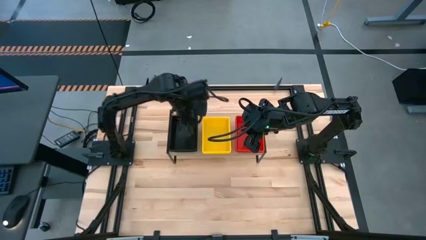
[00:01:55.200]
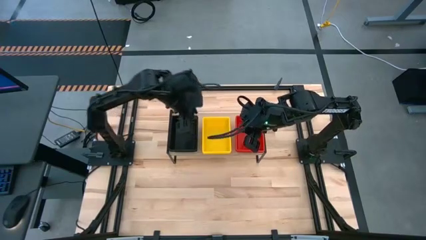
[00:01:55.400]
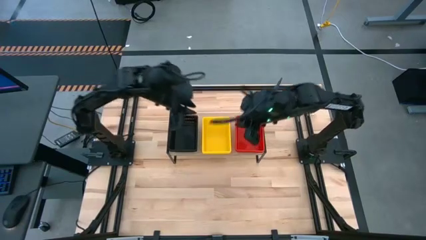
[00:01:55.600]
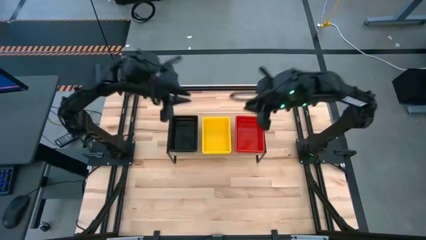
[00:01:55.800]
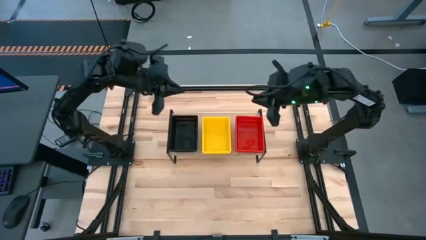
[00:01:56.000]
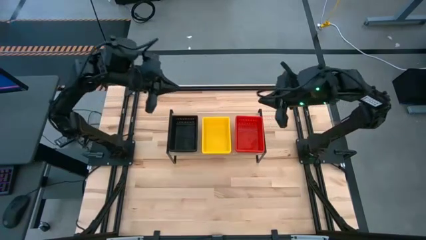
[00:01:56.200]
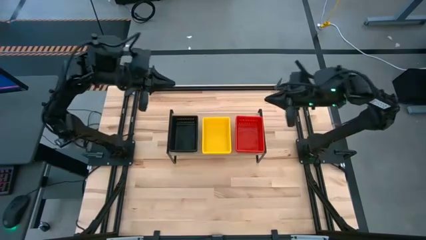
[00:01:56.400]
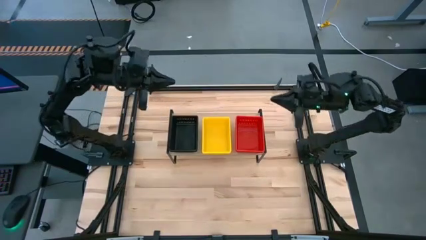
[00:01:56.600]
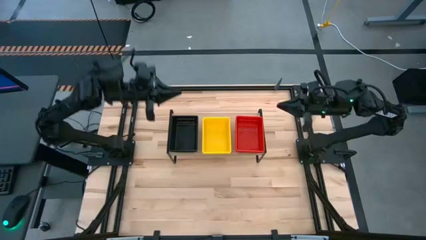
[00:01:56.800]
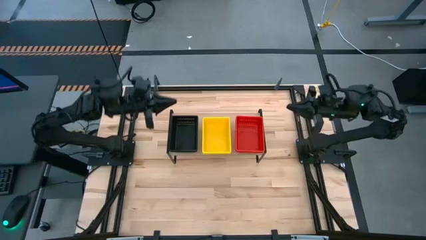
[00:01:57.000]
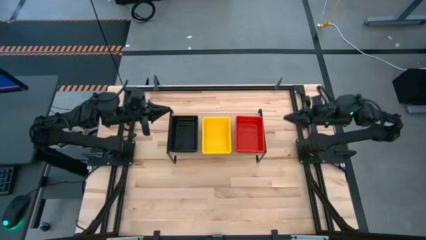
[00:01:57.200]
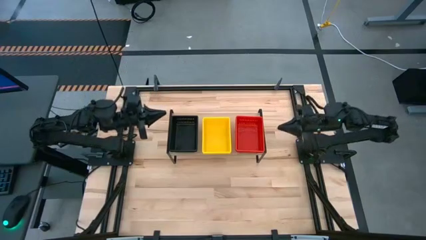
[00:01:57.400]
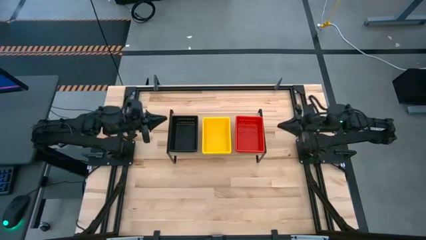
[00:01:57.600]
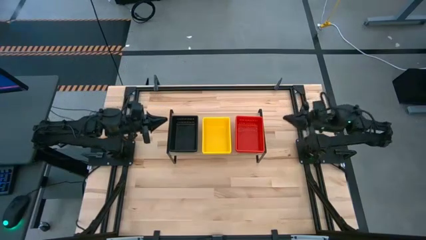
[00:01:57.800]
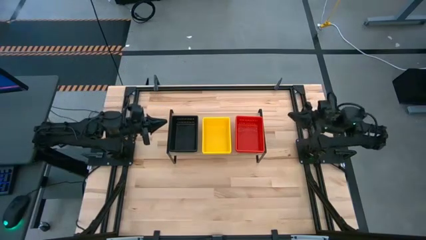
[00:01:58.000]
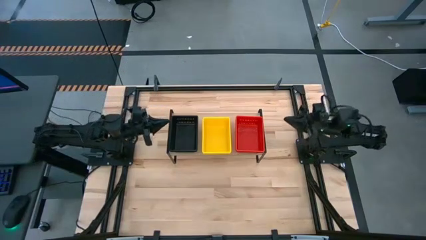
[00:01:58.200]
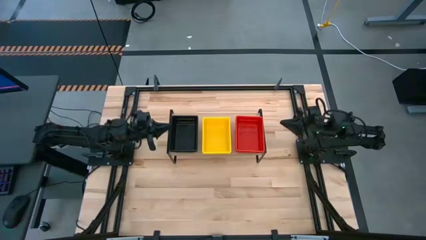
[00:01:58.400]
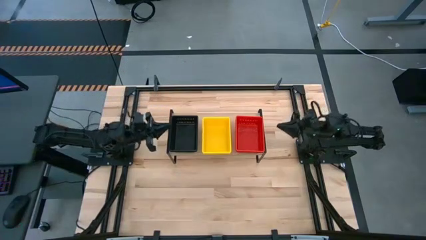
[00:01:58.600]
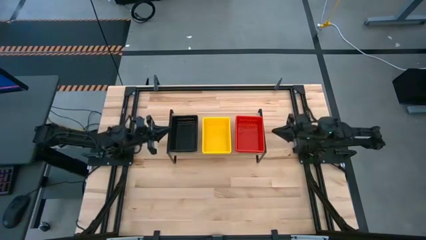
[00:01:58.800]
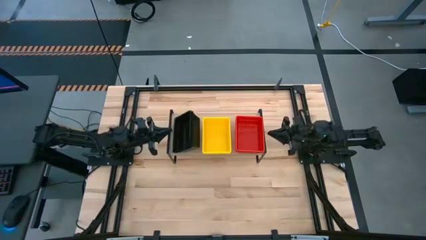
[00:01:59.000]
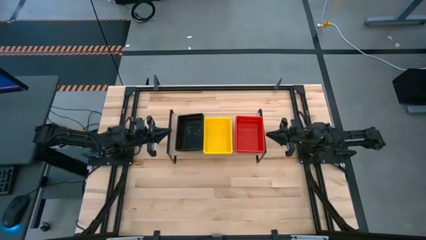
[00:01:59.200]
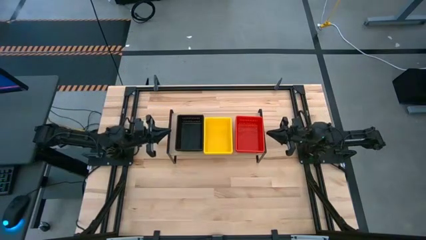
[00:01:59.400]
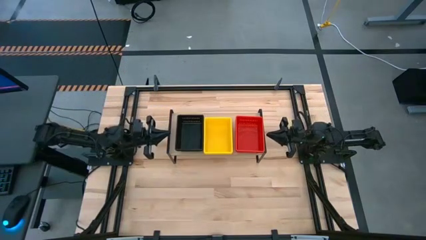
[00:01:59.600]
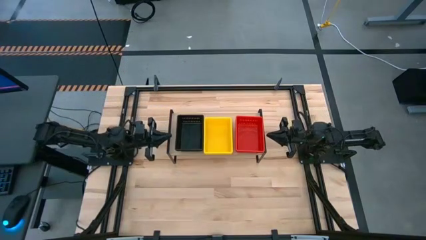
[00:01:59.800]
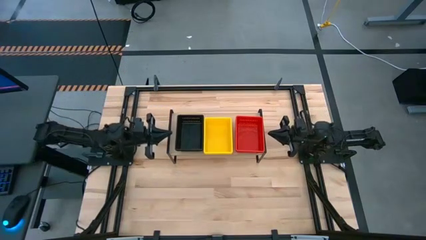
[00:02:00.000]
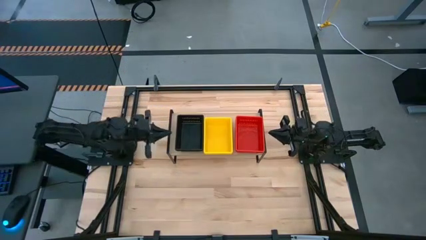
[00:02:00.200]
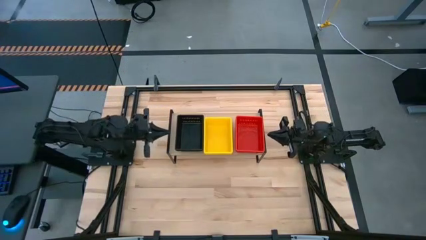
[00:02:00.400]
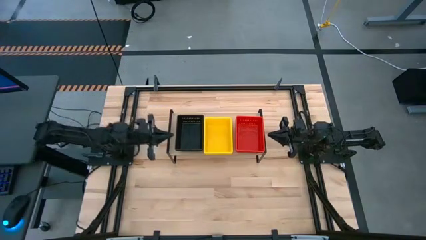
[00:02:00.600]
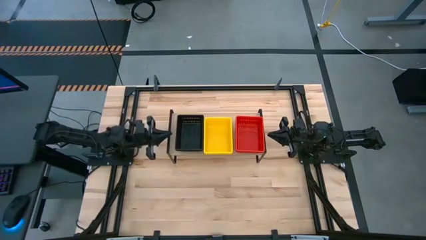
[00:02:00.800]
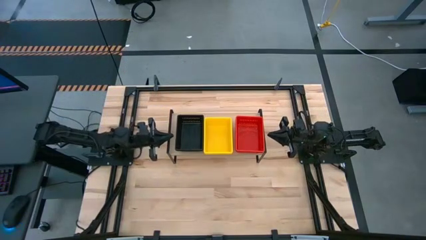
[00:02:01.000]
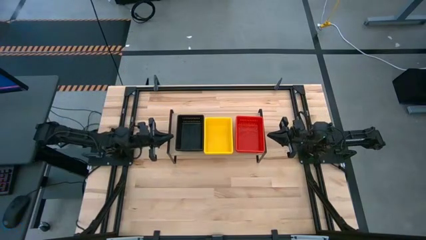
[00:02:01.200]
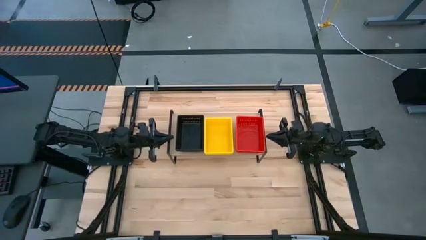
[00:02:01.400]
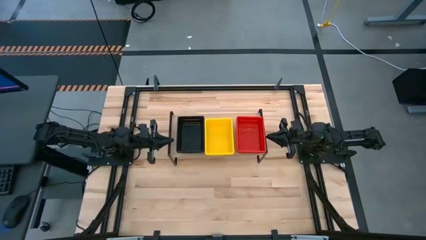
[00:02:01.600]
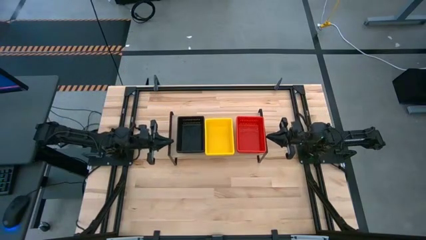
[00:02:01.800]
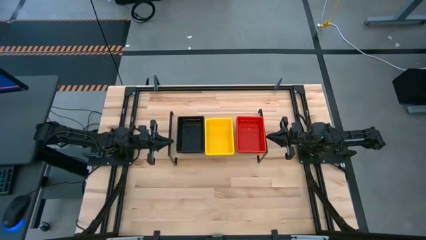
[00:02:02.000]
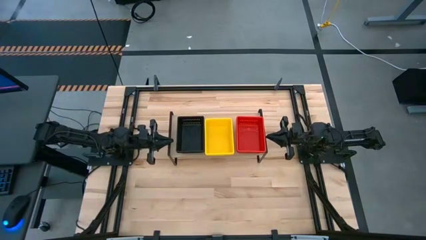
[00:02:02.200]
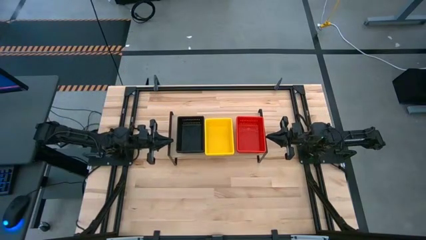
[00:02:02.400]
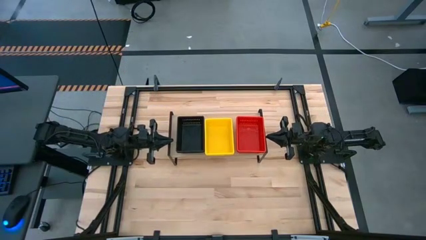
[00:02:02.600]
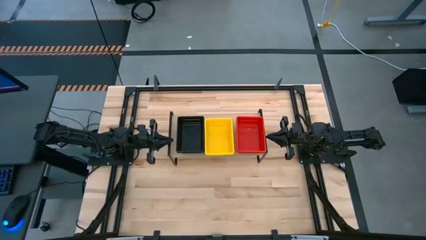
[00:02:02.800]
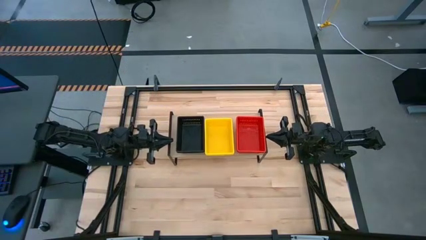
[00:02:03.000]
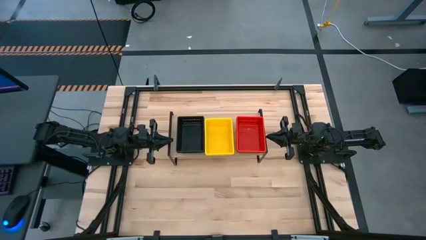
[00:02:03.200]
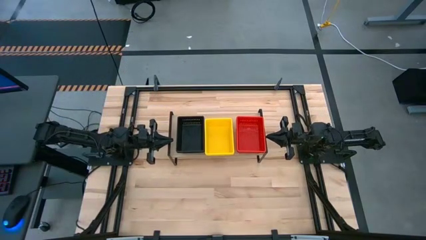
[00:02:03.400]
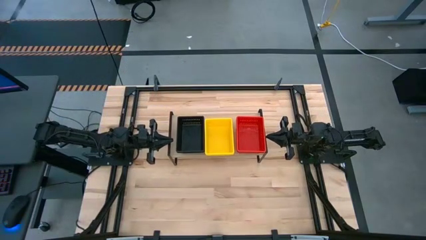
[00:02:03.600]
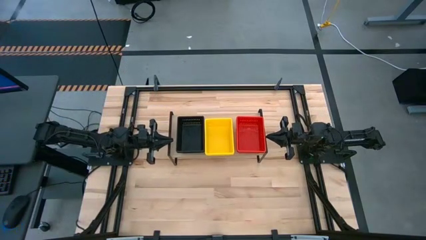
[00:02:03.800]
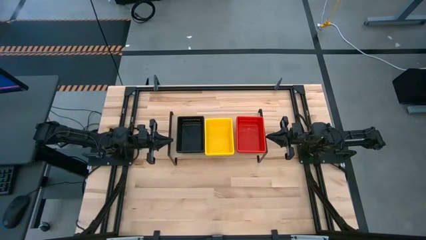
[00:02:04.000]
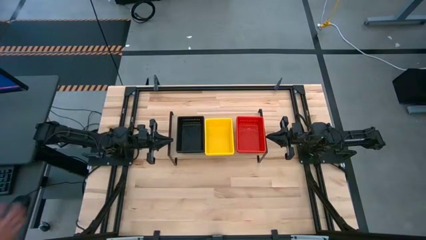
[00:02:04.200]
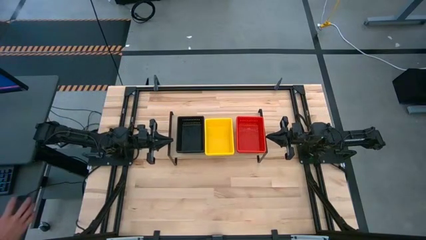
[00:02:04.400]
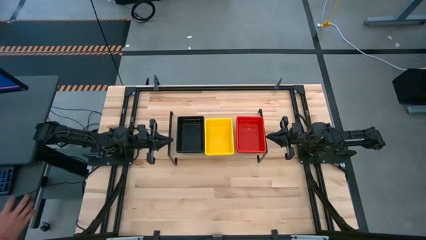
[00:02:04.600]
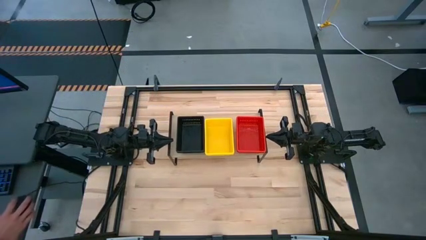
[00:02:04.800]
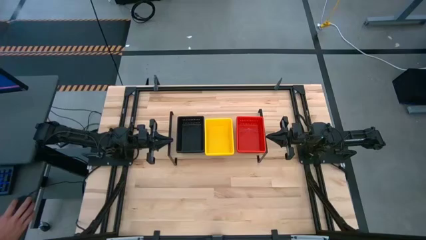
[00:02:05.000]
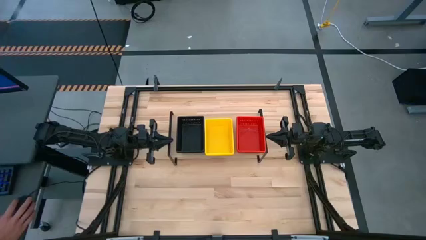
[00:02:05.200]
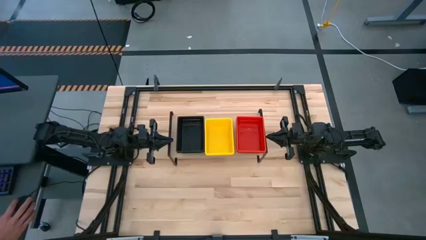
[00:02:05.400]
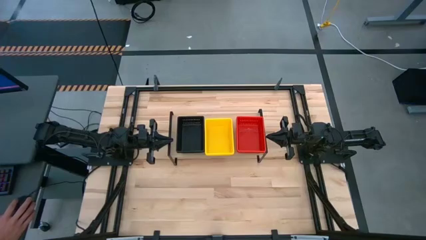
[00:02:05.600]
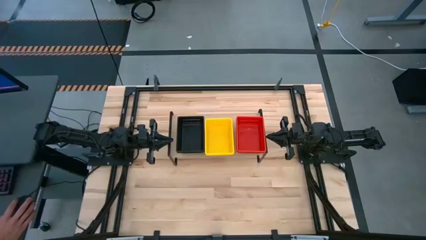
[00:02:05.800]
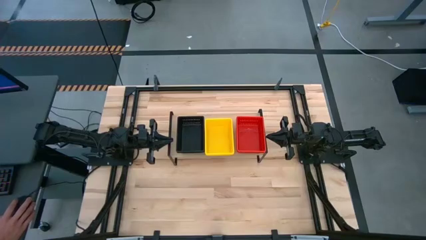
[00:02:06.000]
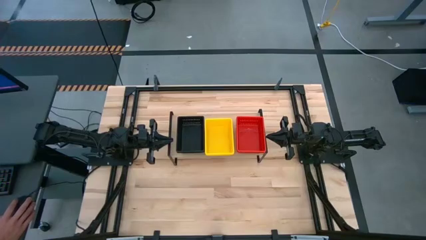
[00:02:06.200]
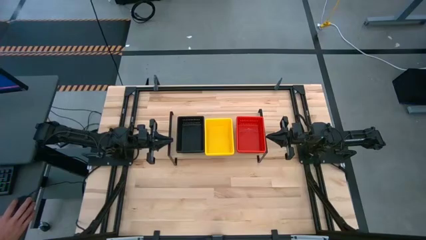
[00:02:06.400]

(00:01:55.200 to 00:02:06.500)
Task: Stack baskets on shelf by color
Return to Home Position
